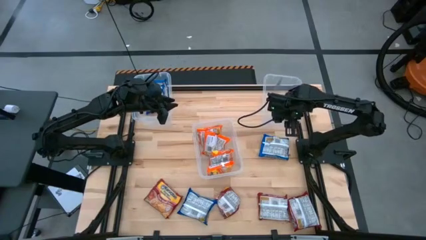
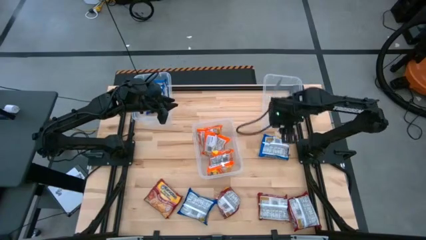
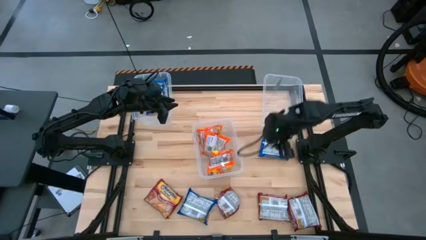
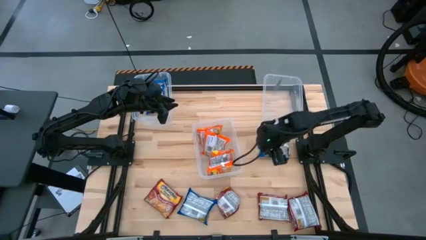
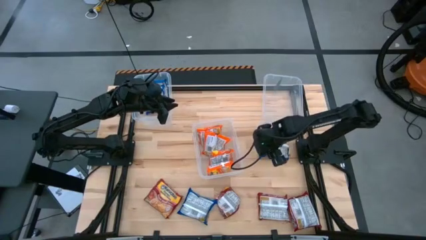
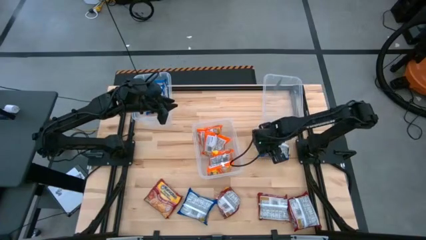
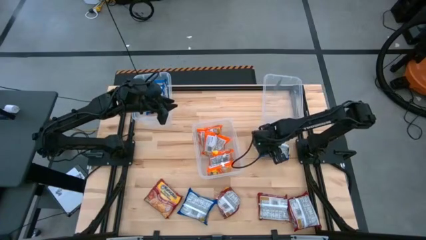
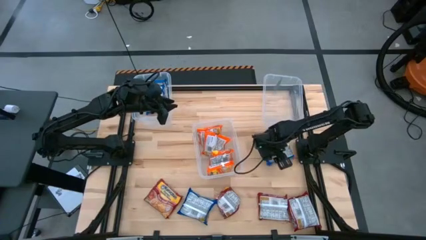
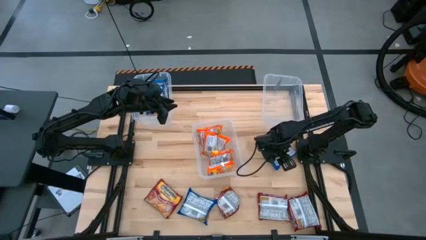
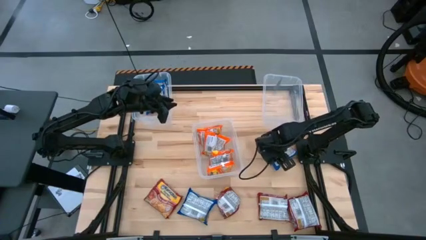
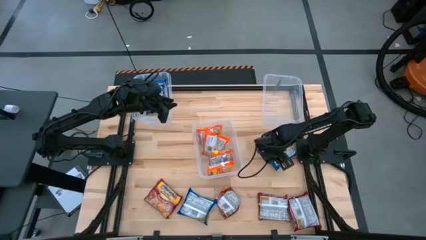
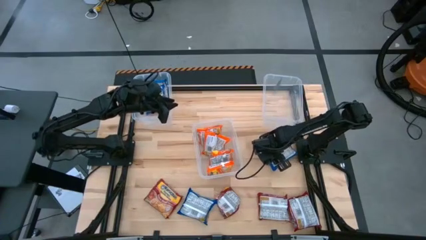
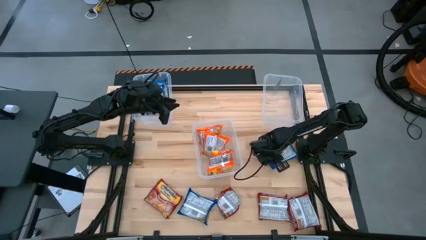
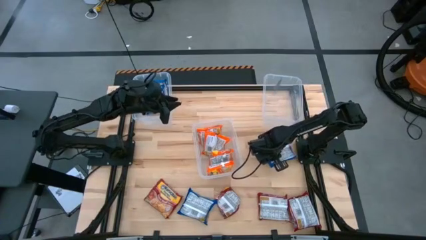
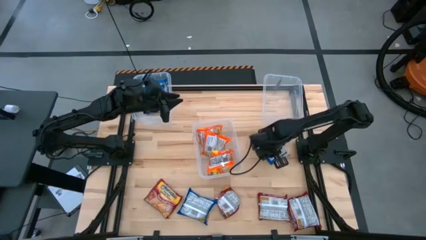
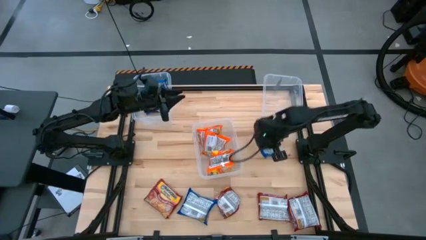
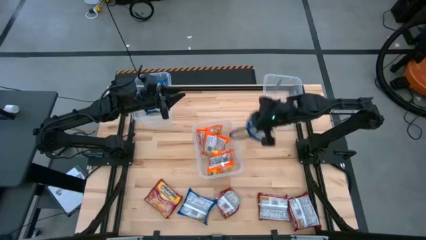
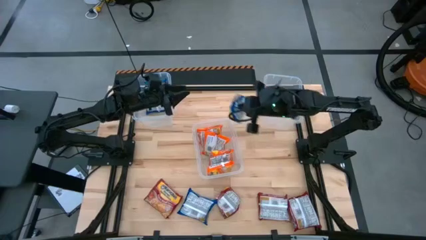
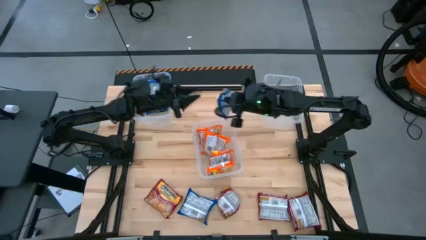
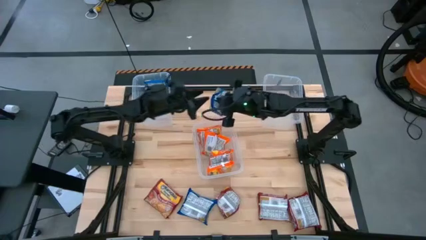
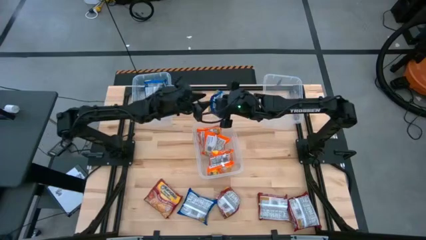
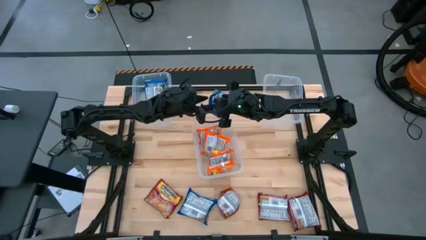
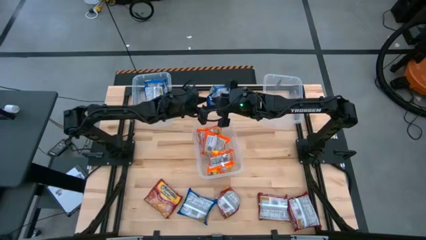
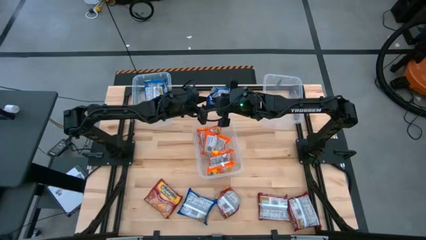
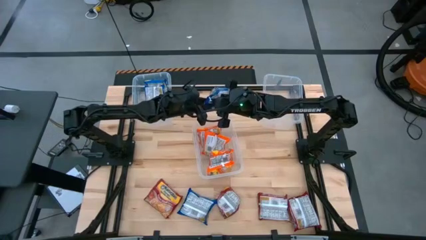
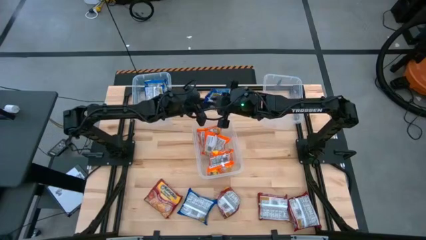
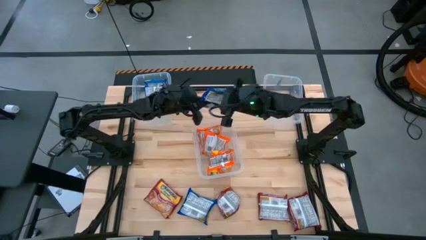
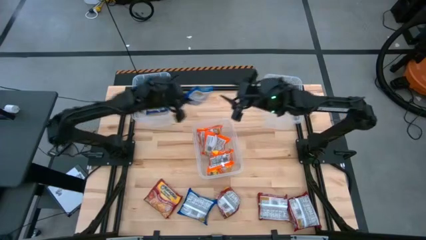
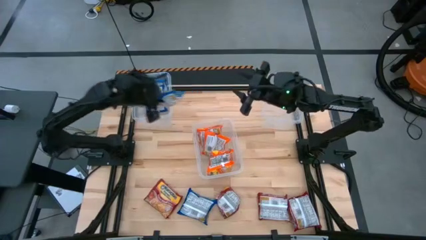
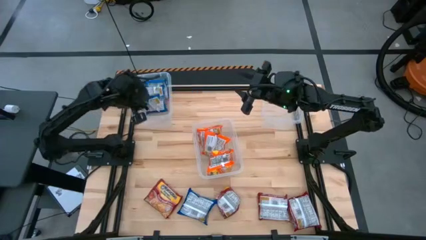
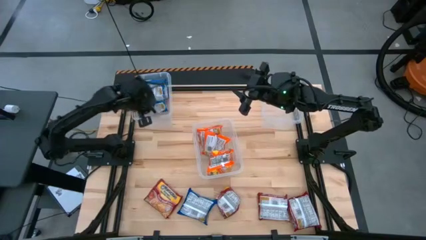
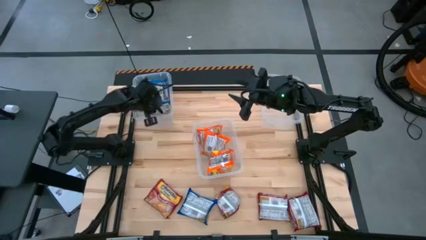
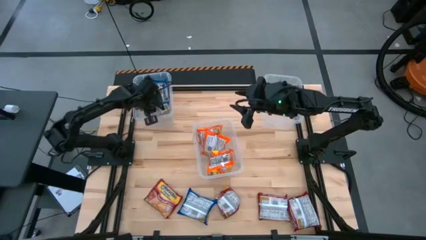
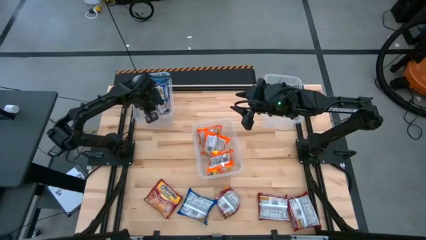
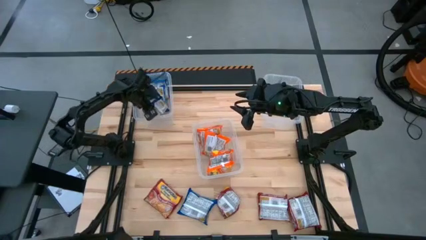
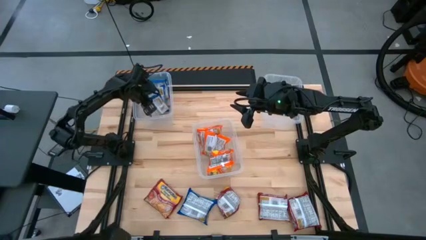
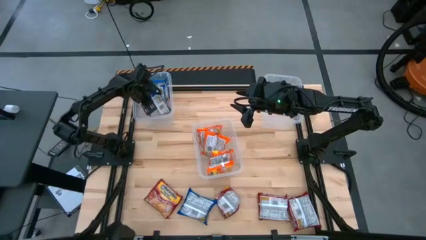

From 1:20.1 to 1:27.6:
Task: Sort Maruchan noodles
Put the blue noodle pack into the left transparent bin

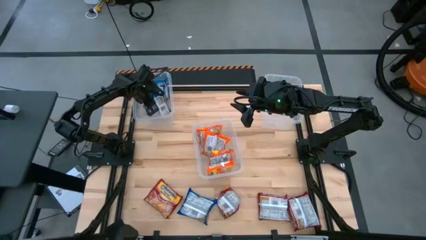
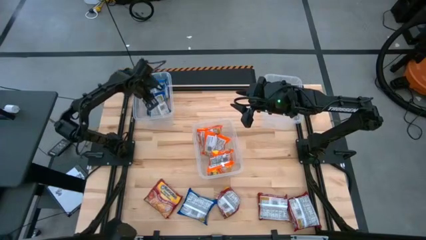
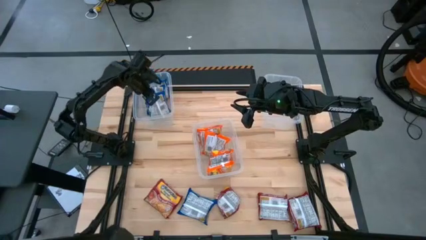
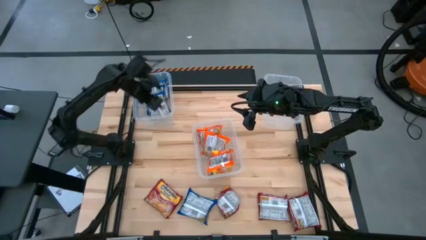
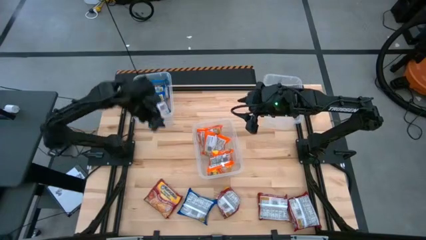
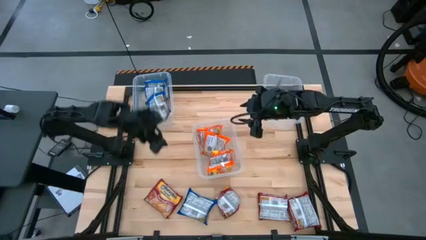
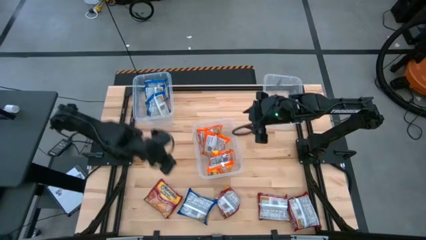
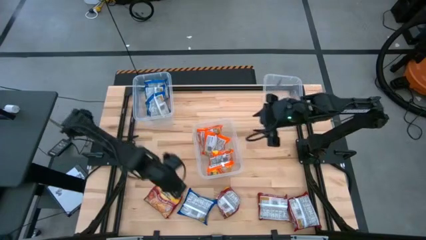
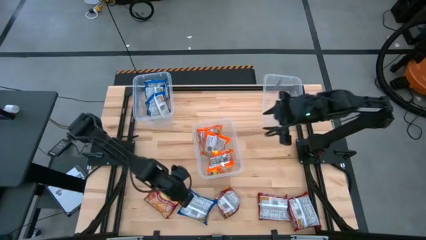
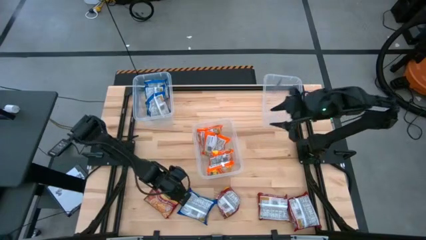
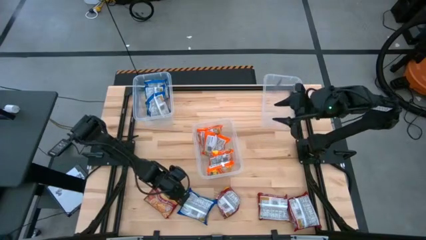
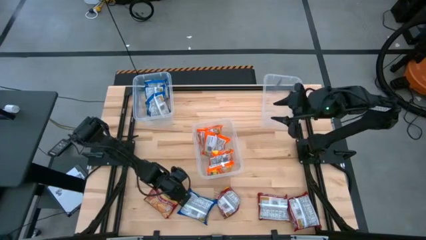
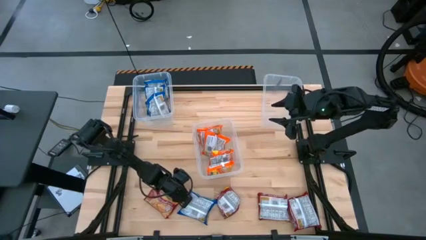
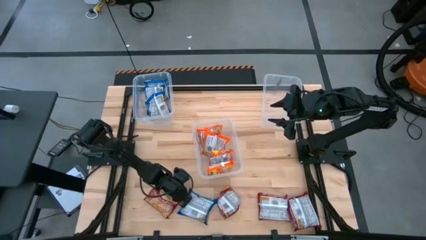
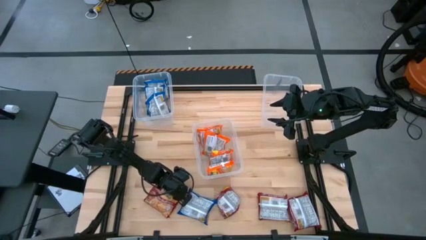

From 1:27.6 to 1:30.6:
Put the blue noodle pack into the left transparent bin

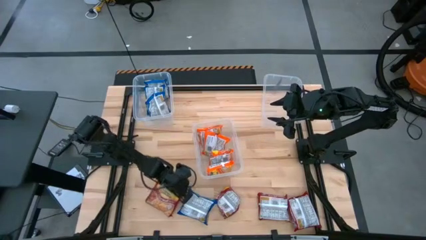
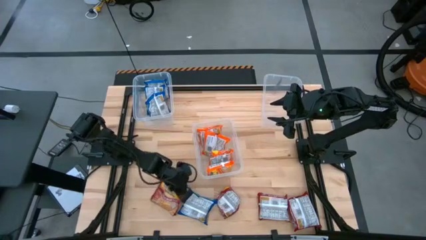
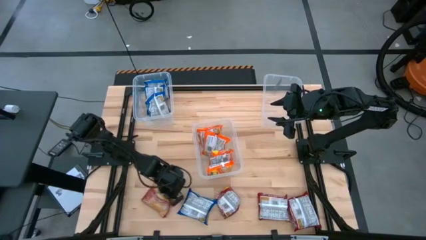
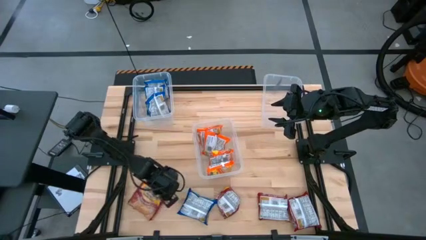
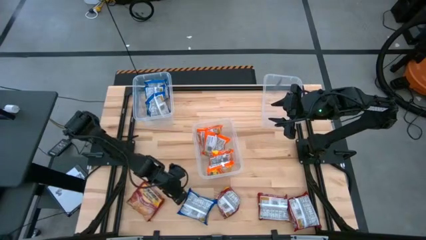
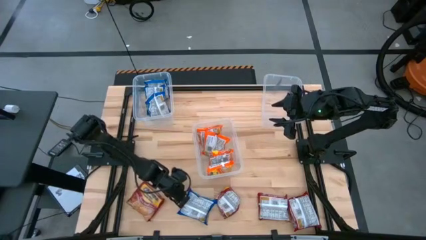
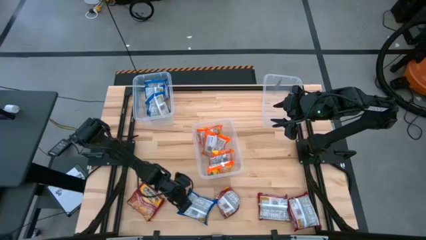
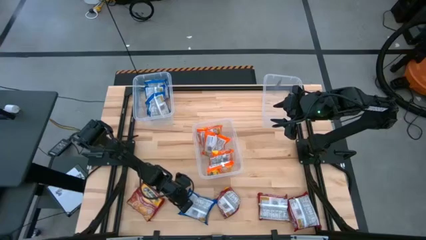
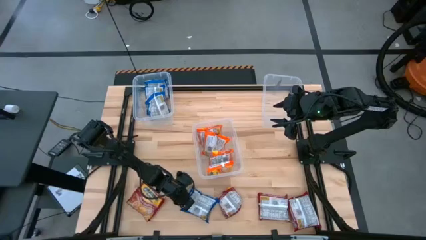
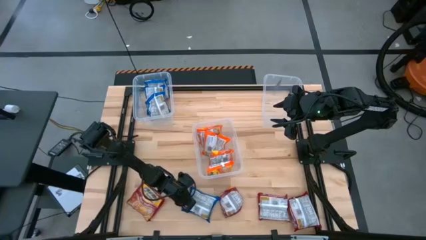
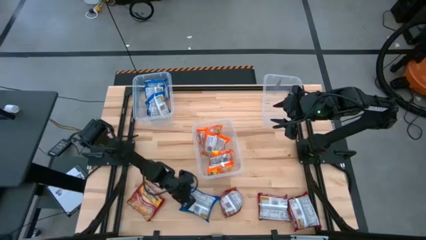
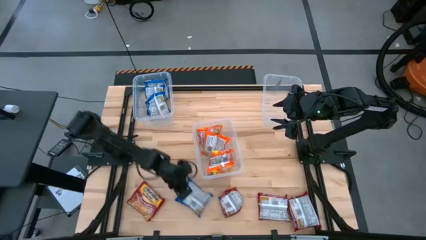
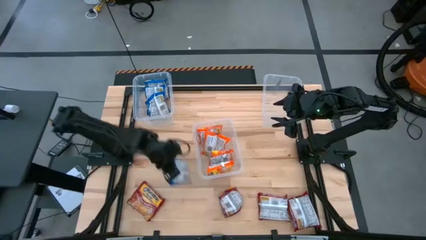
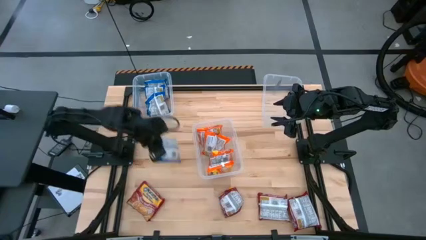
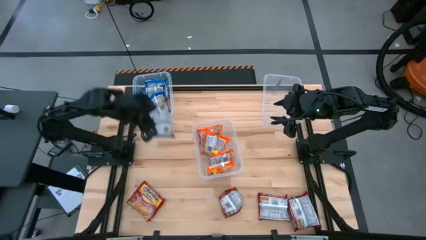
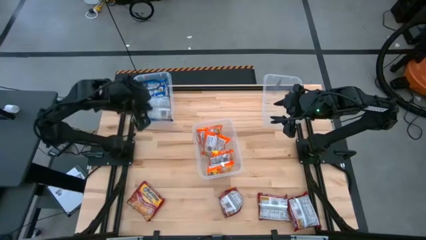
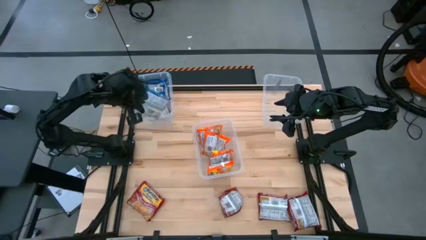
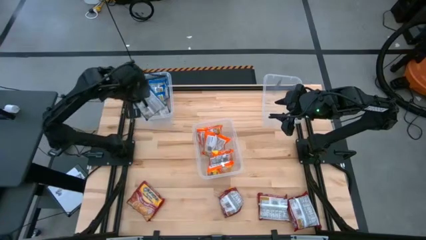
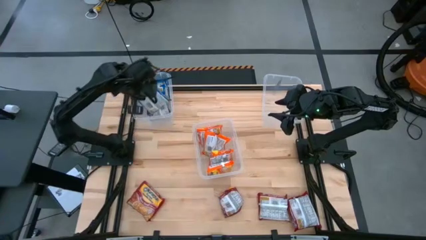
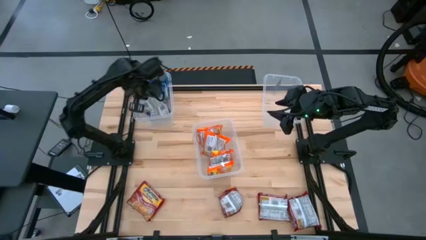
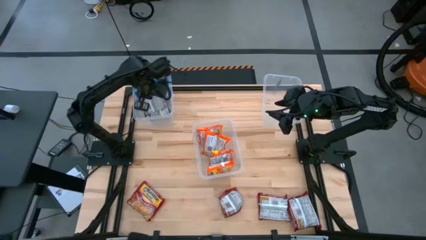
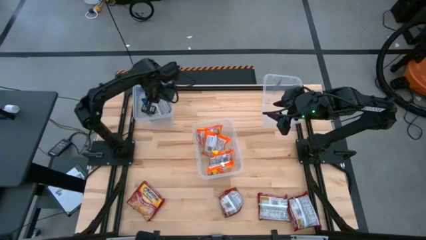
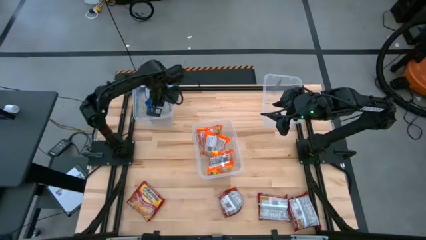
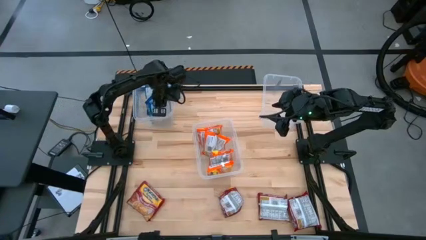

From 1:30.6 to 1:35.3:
Put the blue noodle pack into the left transparent bin
